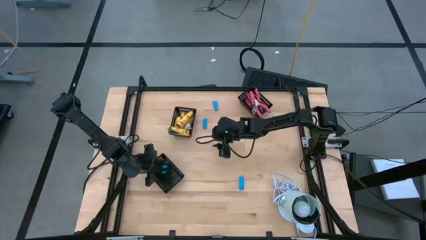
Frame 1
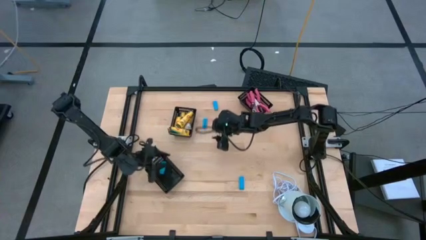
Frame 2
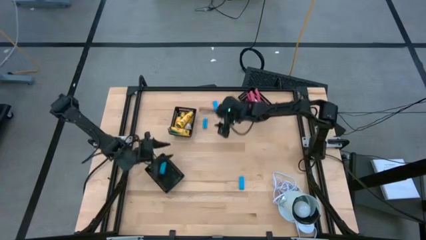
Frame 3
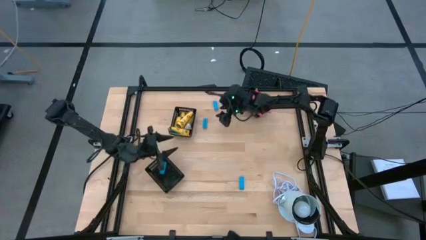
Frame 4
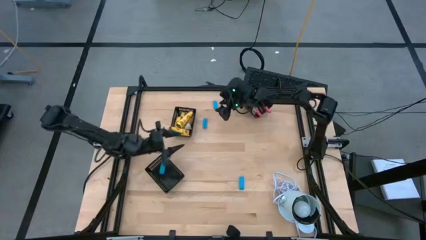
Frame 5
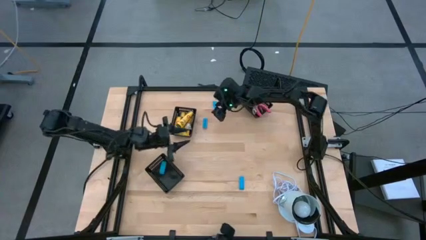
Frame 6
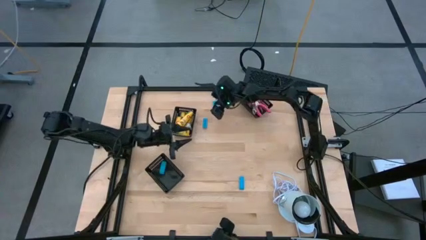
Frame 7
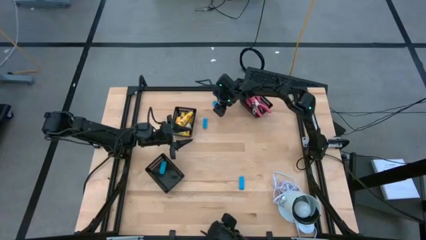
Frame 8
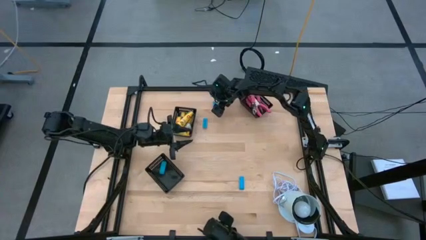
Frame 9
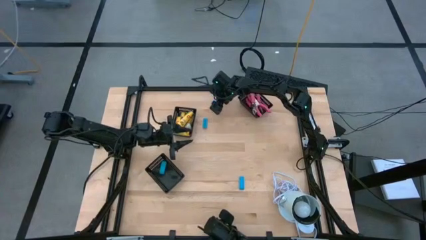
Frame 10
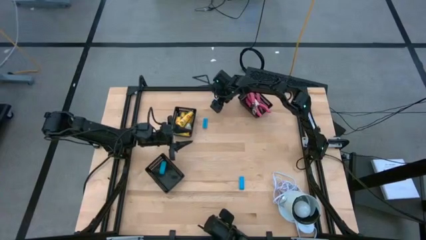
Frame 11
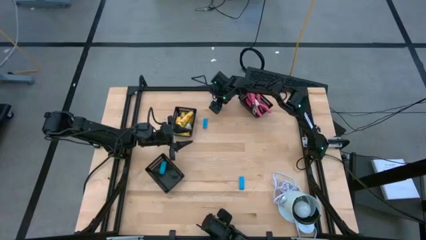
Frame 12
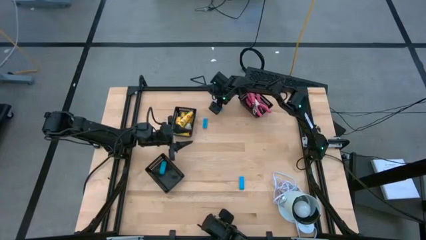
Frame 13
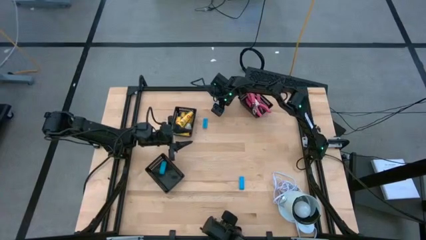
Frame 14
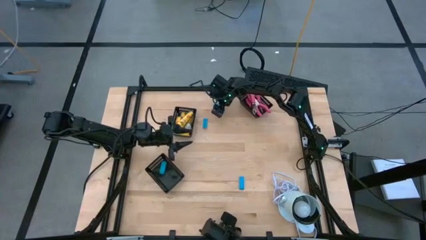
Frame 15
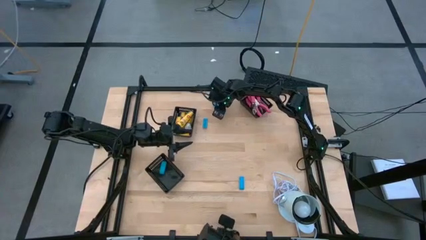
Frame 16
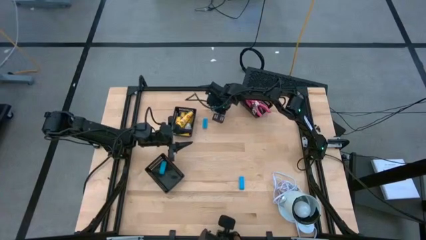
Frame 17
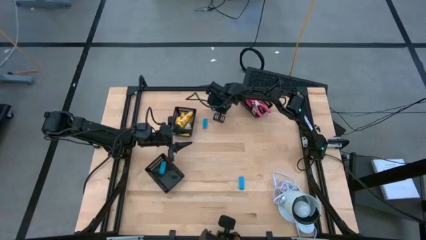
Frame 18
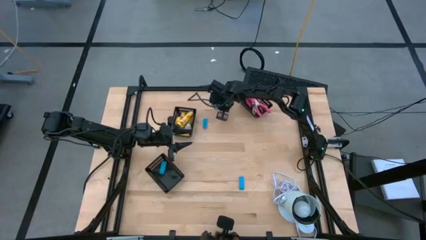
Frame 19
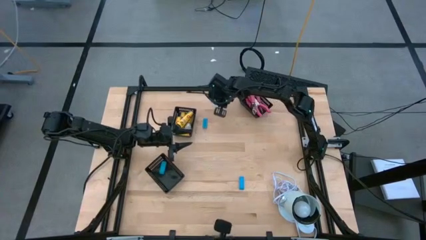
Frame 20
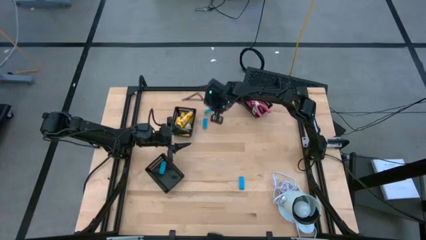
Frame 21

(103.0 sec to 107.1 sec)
Task: Pick & Place School Supplies
Put the blue eraser into the bottom black bin

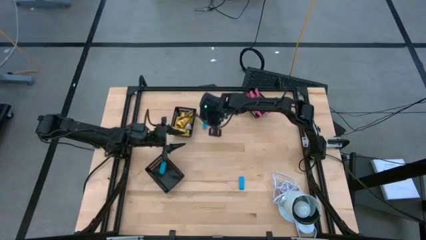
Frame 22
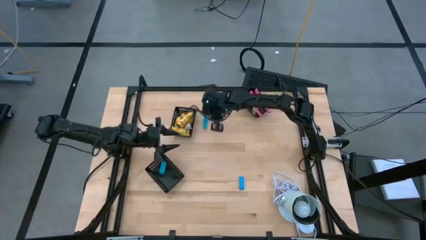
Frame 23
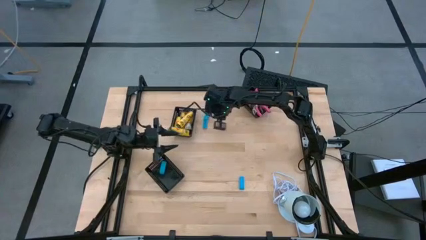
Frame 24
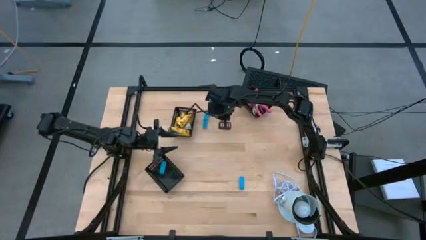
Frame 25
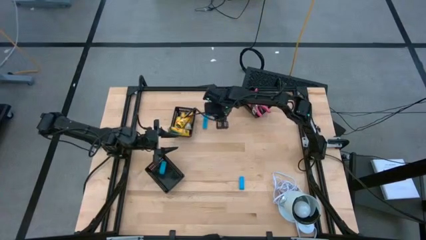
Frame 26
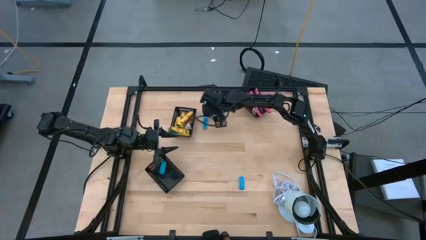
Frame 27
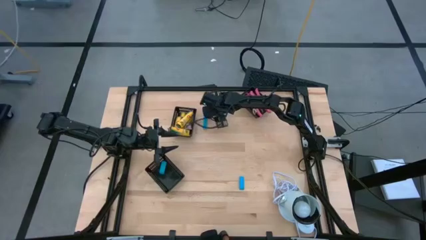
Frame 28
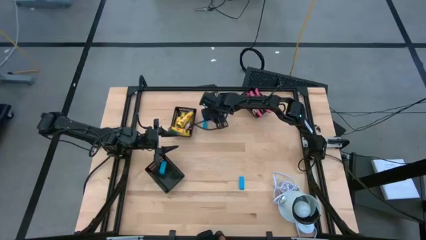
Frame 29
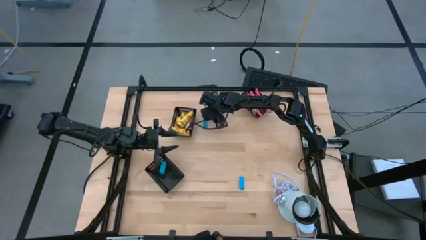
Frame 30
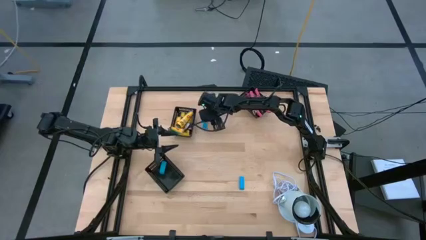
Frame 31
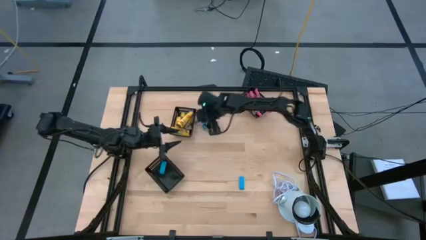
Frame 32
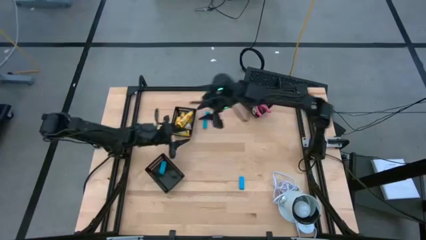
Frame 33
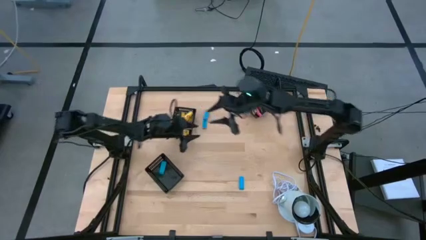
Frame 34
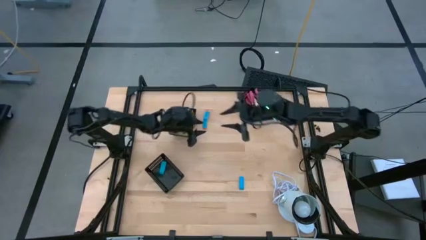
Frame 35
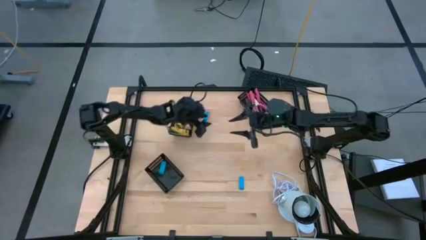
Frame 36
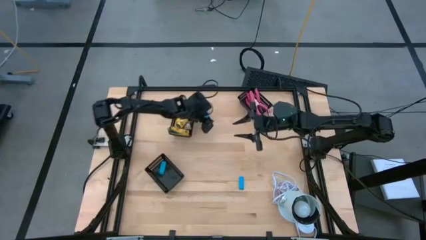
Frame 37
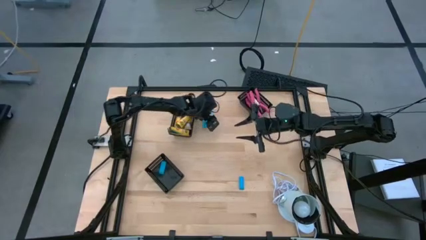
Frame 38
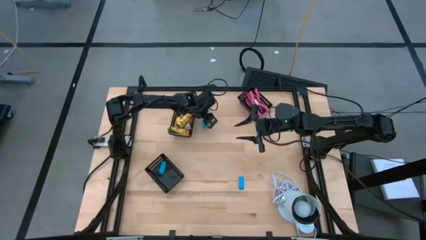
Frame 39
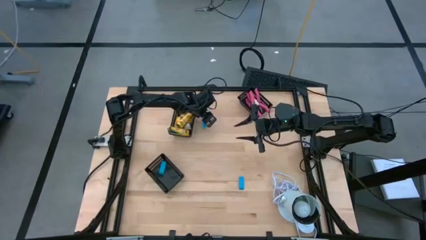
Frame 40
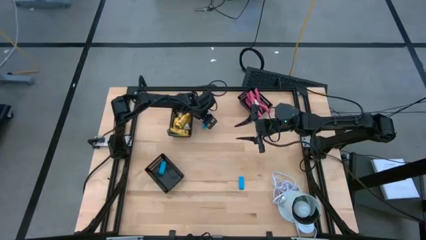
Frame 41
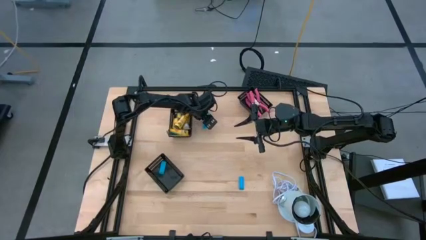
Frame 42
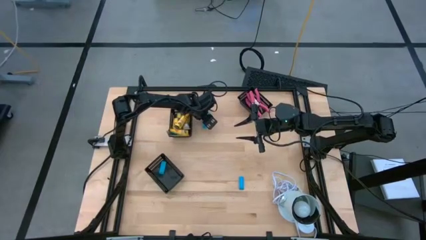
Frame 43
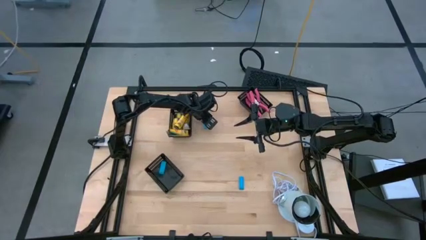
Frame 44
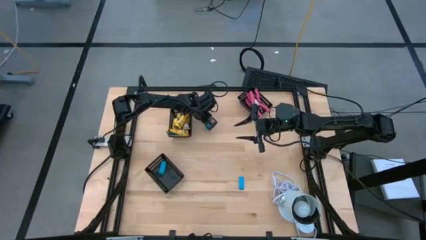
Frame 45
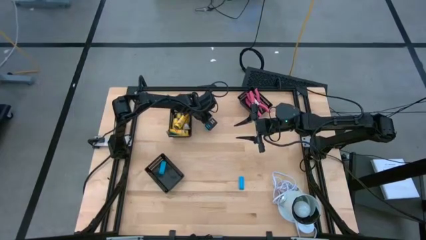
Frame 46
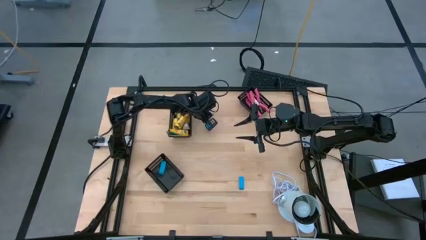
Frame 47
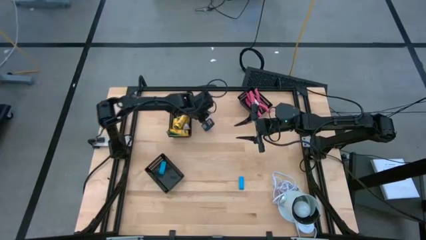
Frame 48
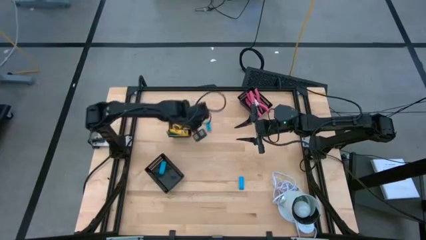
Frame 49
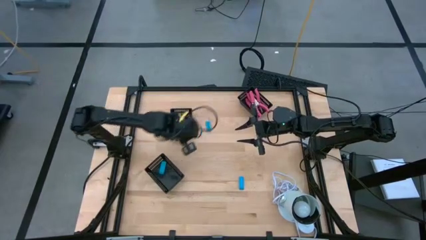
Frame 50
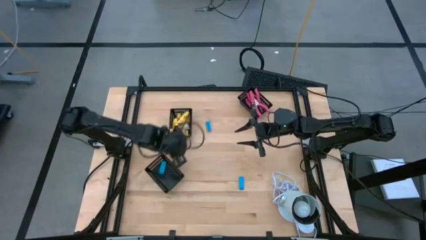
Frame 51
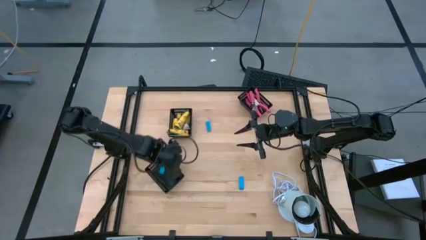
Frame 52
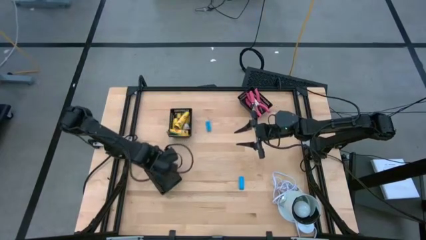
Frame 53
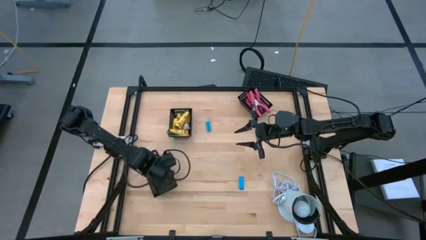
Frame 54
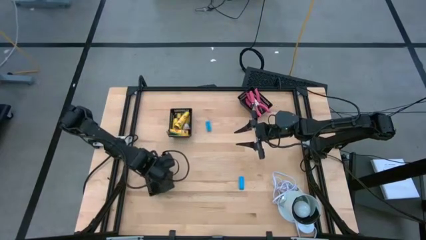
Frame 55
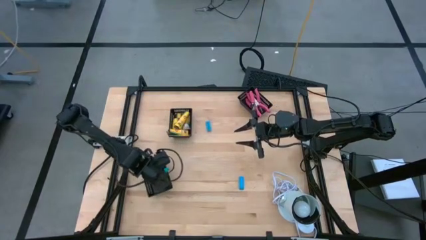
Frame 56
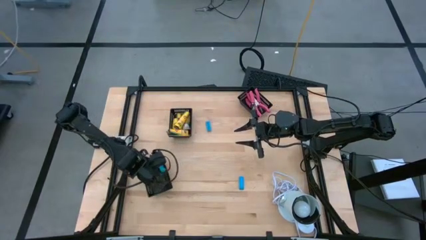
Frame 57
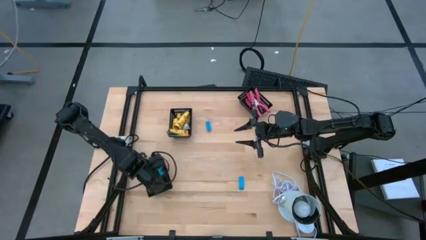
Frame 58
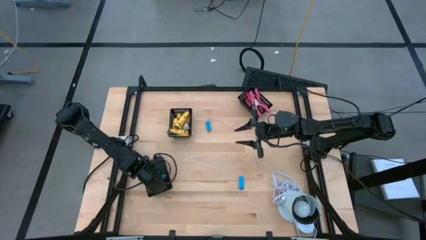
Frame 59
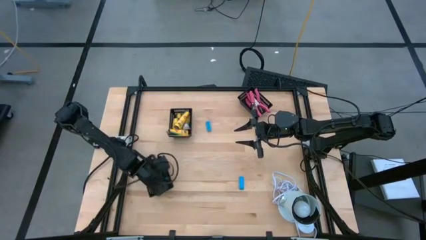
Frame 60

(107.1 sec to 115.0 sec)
Put the blue eraser into the bottom black bin

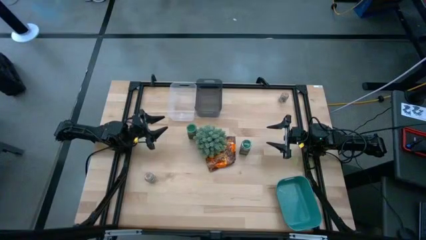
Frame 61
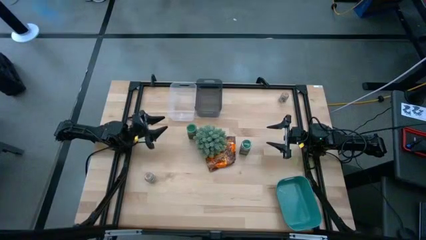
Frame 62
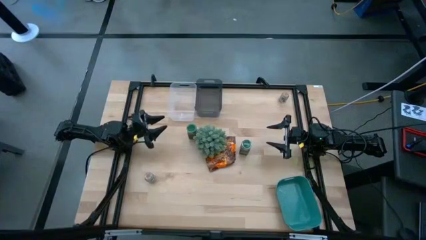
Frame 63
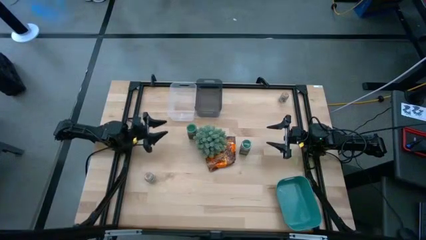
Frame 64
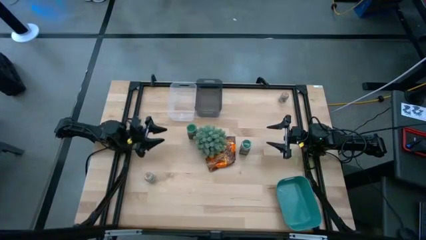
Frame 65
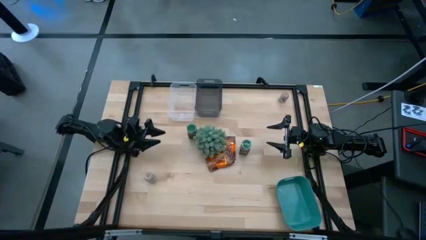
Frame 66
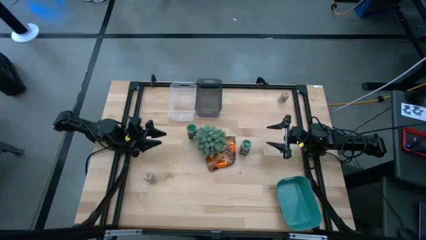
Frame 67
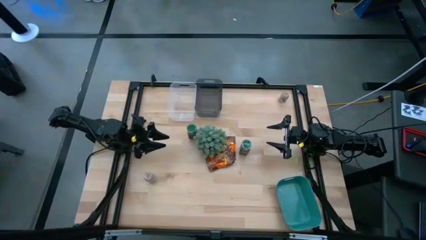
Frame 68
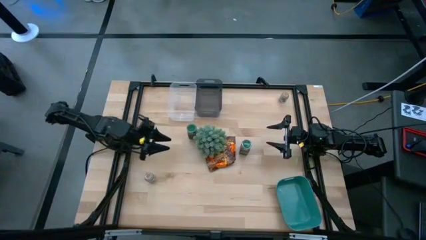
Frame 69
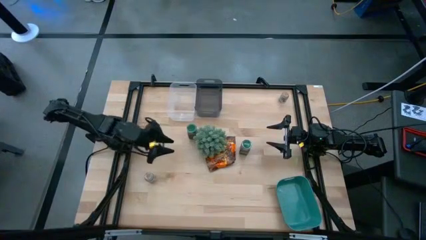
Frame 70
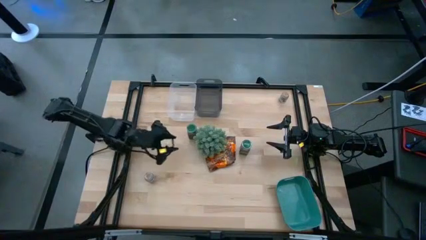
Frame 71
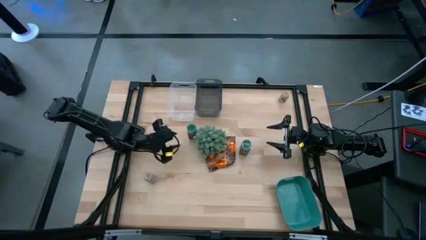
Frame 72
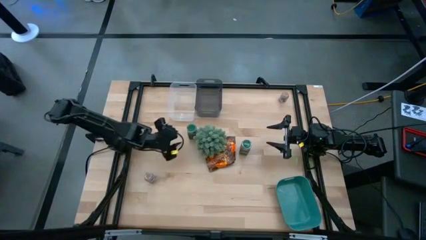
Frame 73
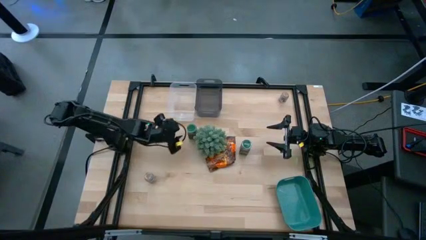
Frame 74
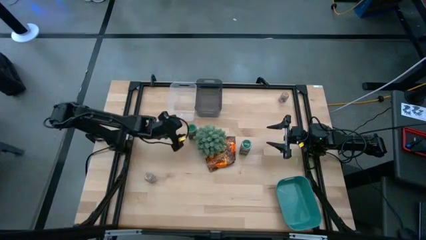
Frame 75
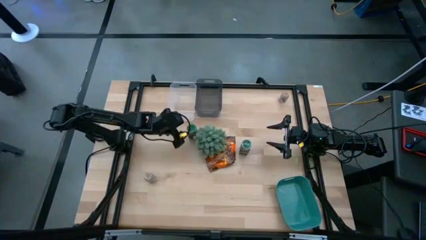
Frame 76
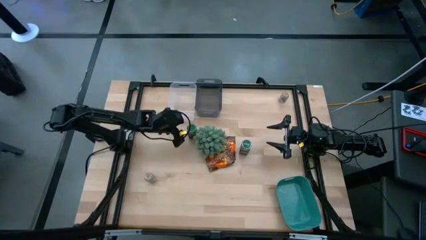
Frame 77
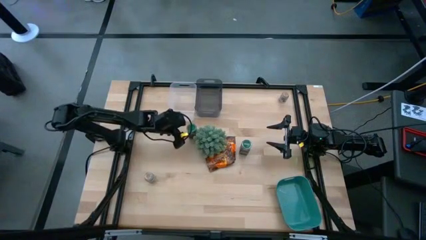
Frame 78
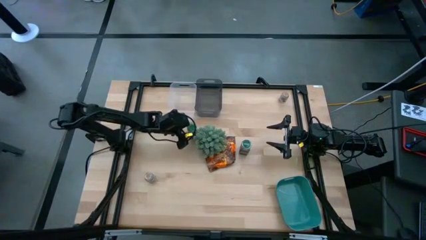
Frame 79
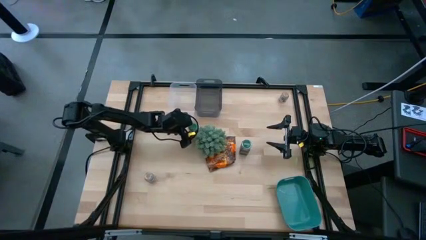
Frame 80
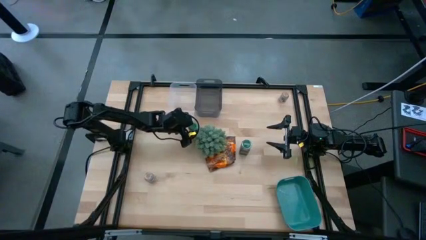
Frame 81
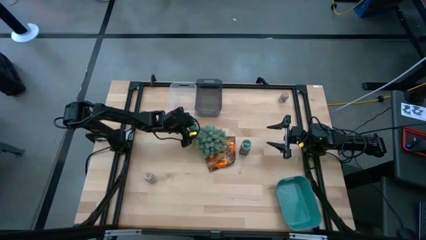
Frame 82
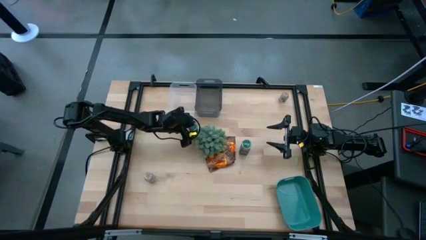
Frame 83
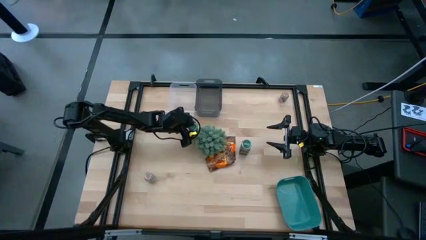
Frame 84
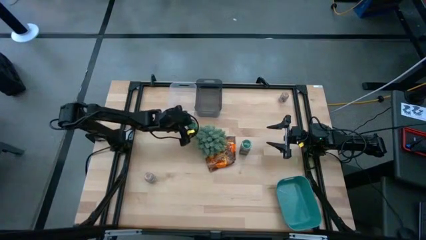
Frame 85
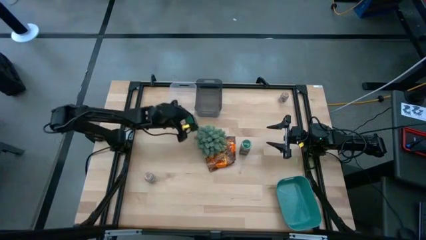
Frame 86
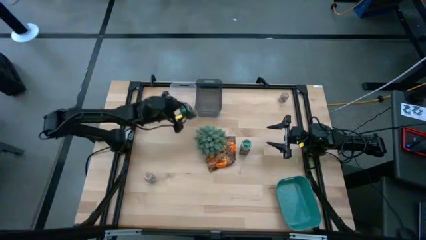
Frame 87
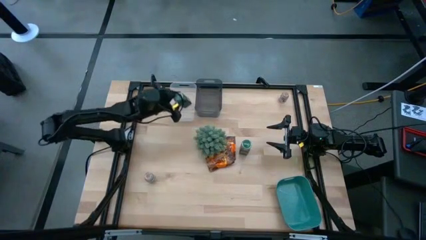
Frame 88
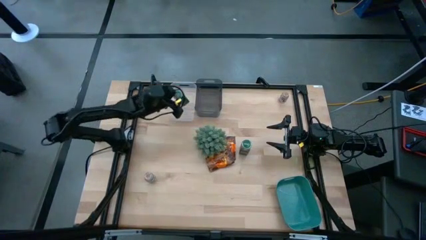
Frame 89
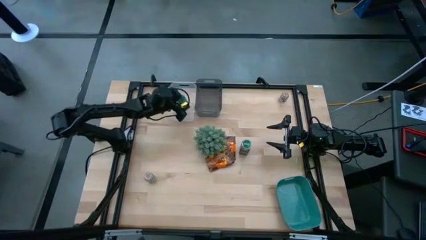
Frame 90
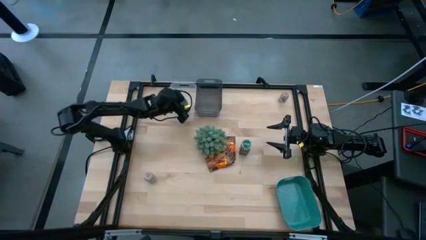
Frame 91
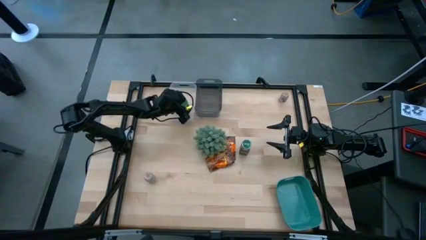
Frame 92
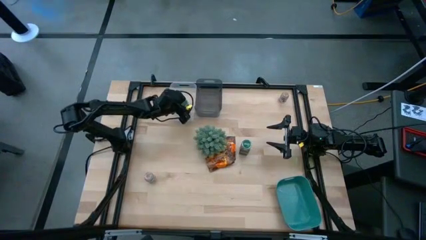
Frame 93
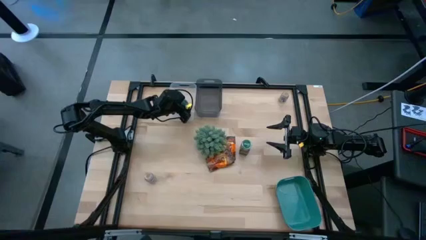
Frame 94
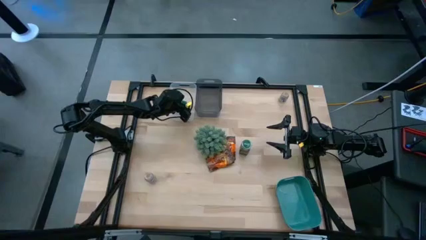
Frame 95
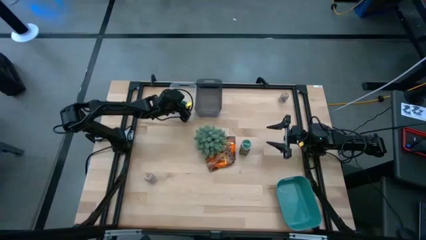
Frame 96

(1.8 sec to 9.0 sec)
Task: Sort spices by type
Put the left green bottled seasoning into the transparent bin
